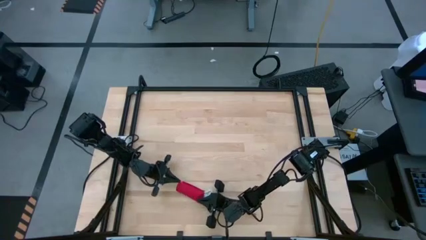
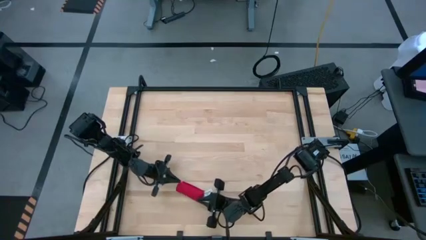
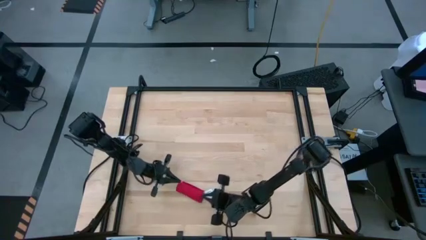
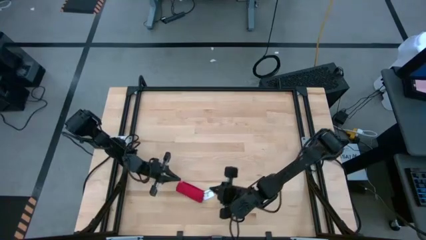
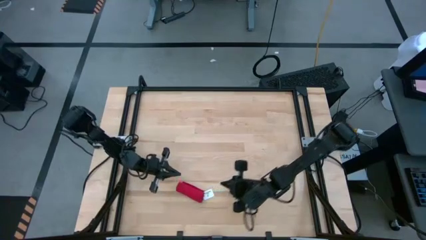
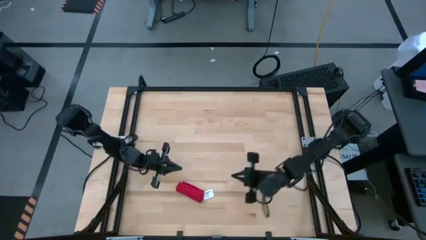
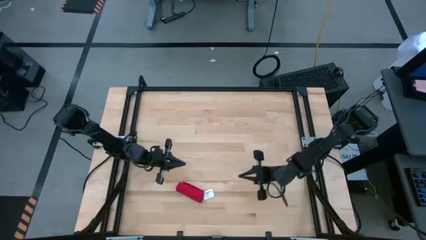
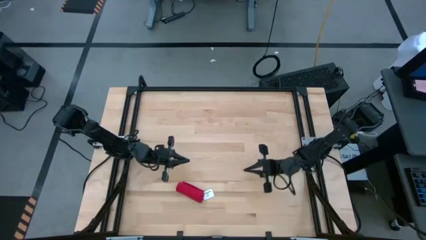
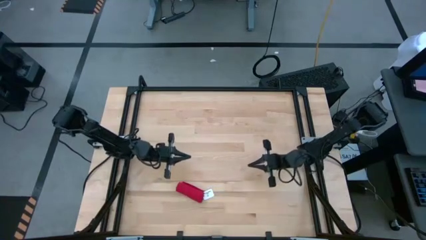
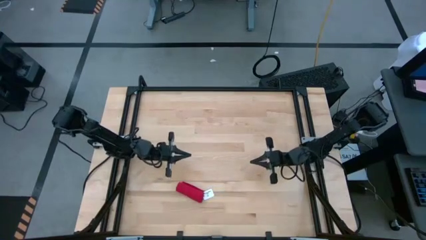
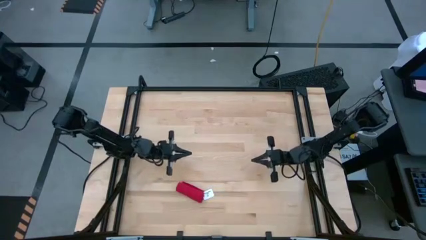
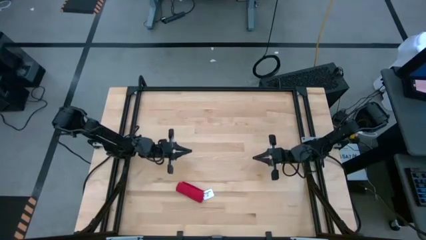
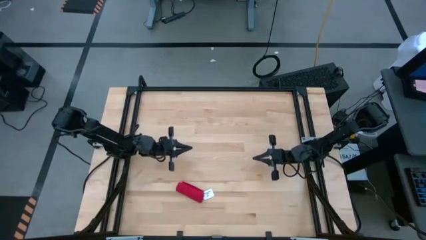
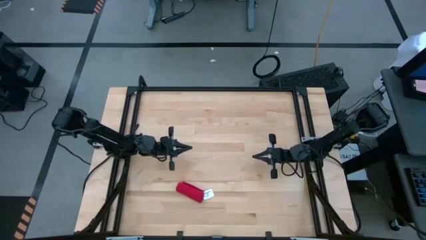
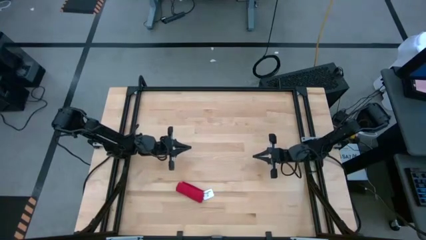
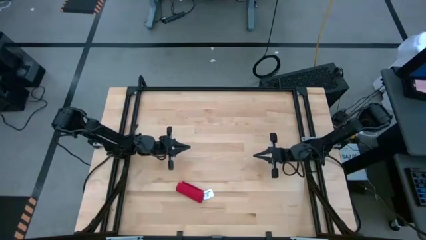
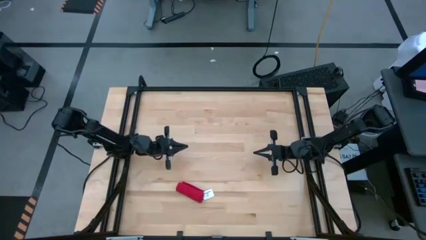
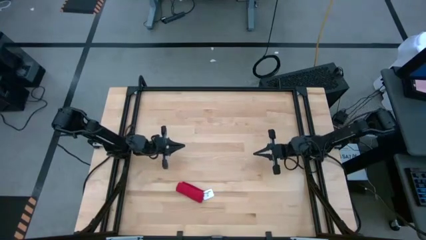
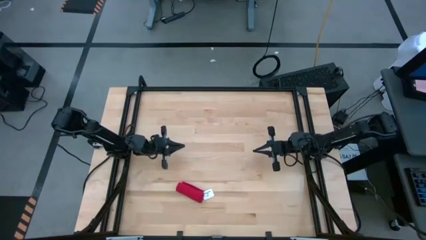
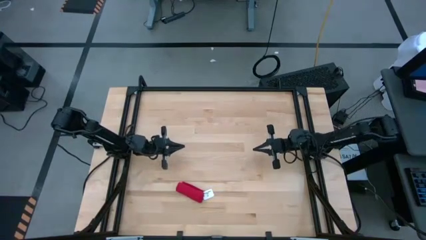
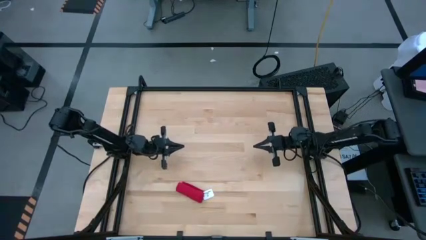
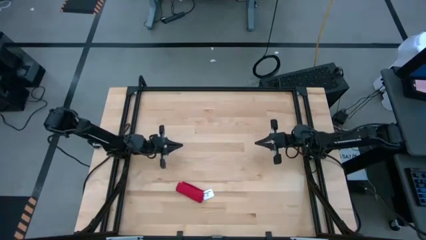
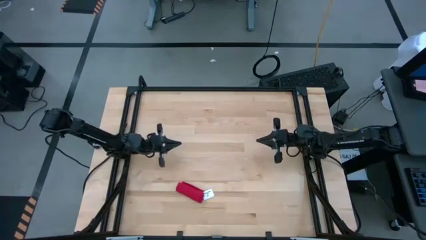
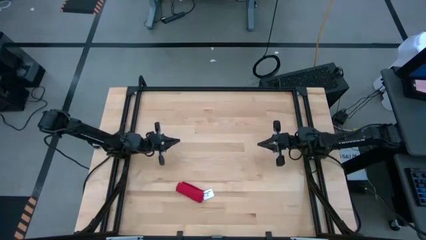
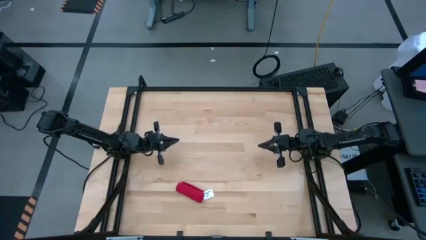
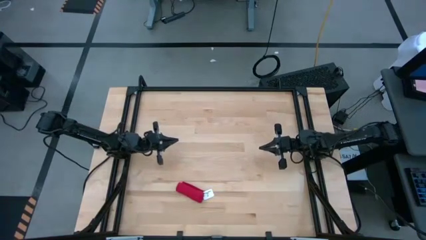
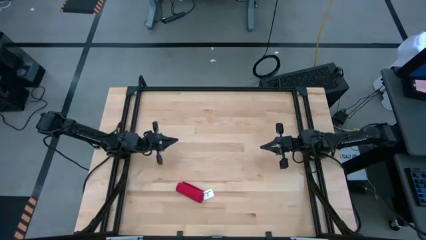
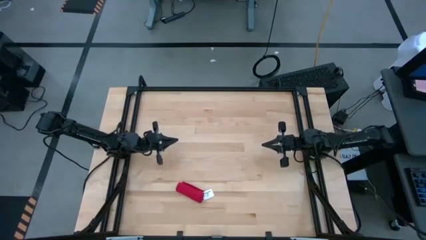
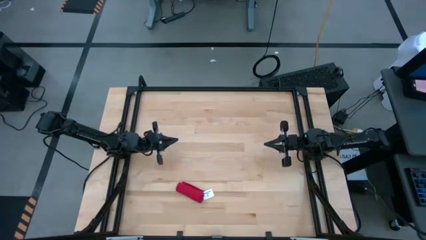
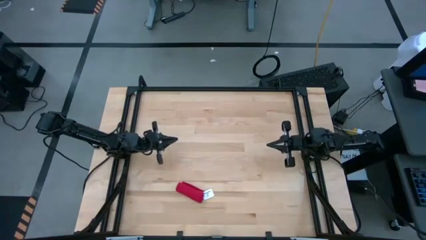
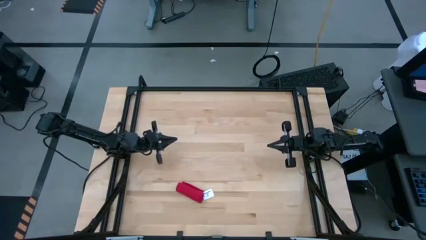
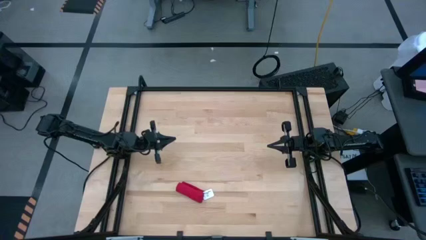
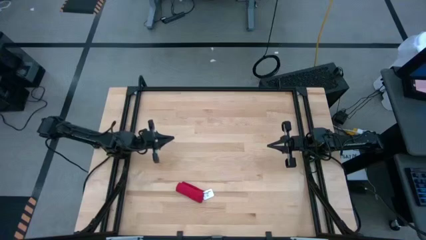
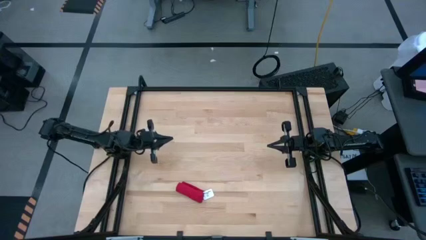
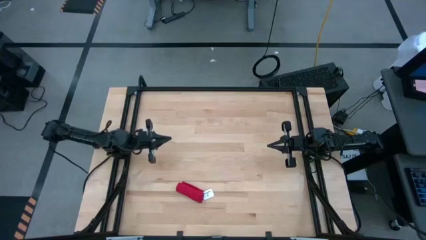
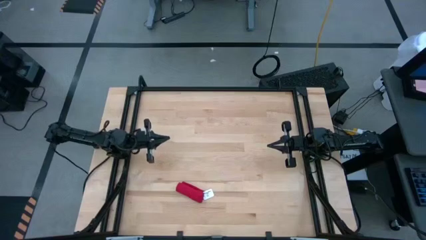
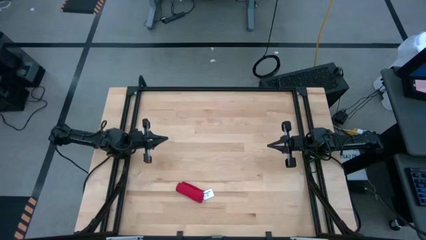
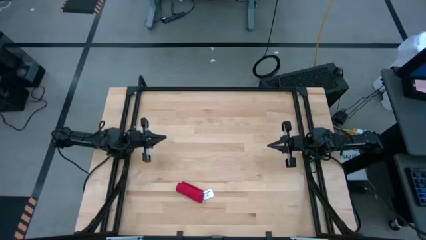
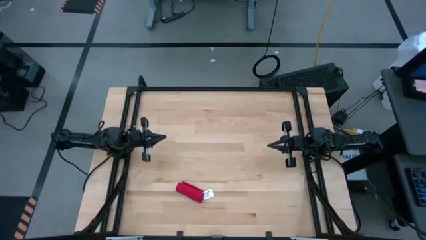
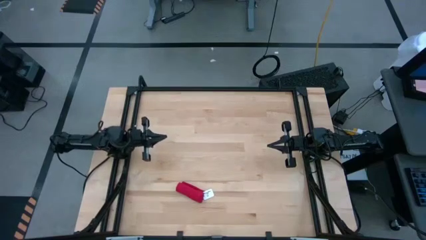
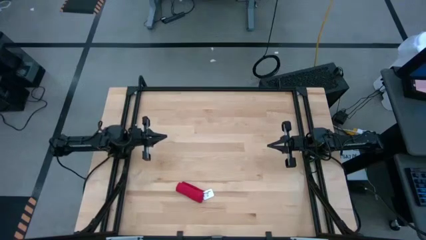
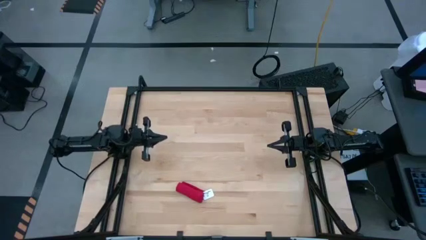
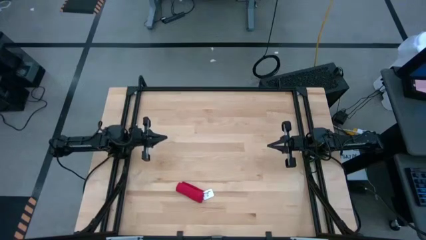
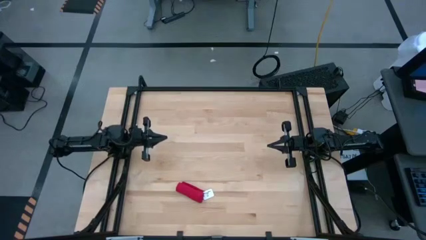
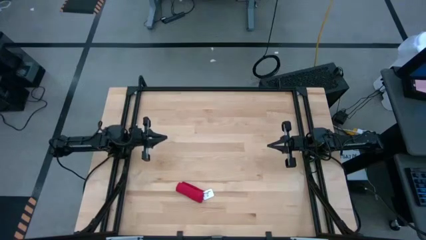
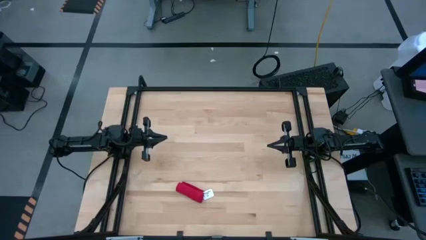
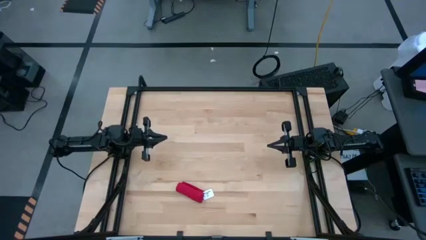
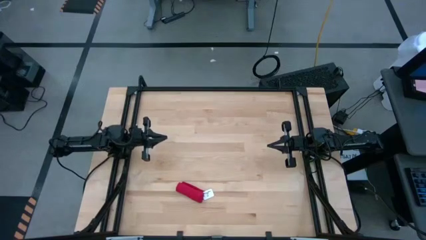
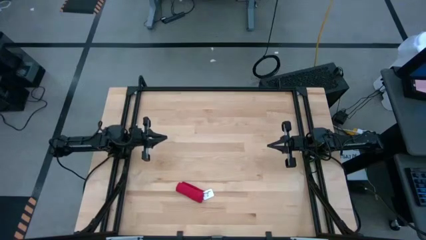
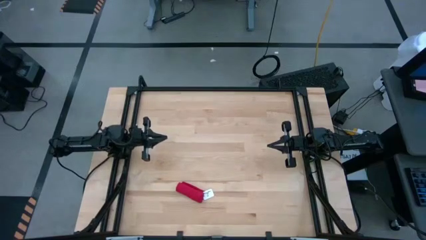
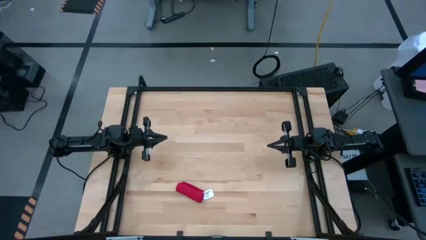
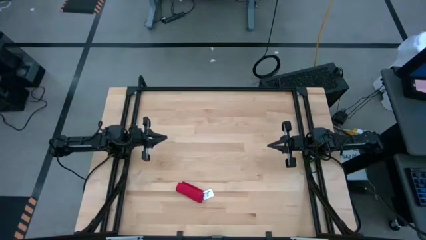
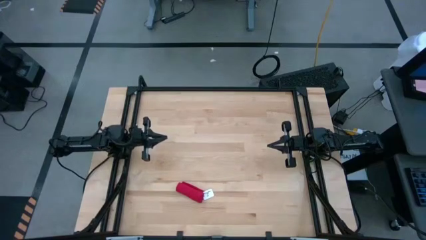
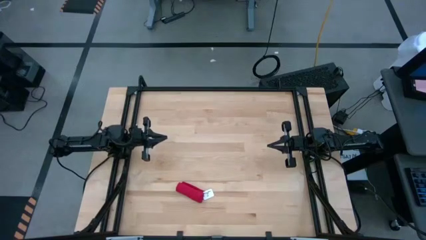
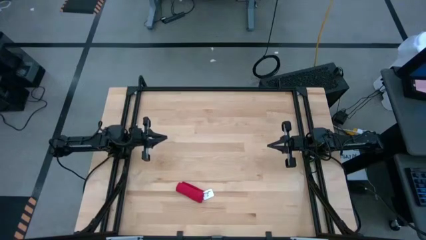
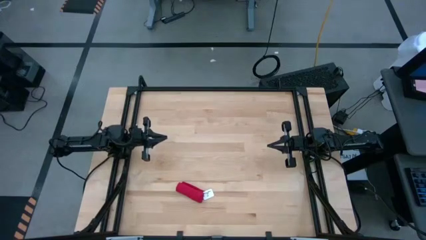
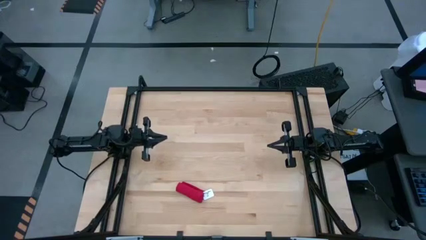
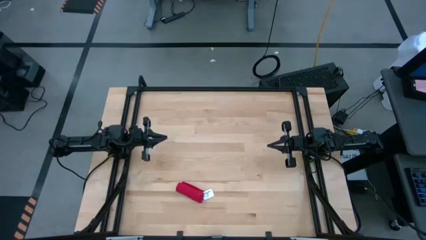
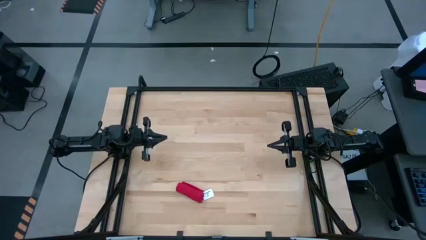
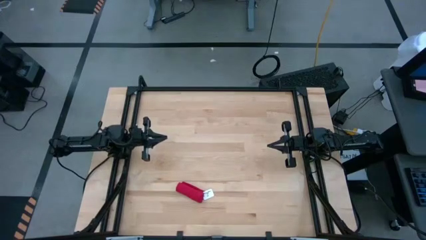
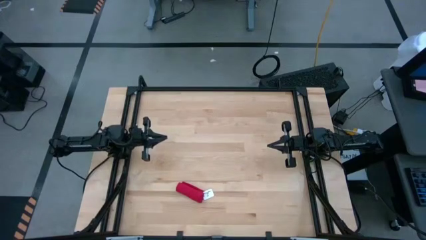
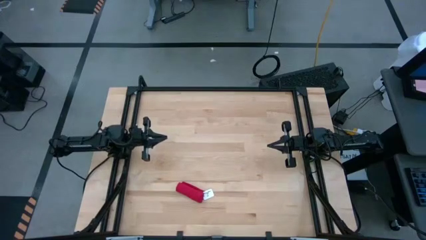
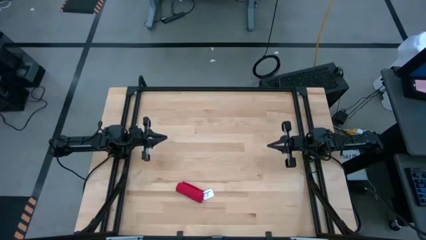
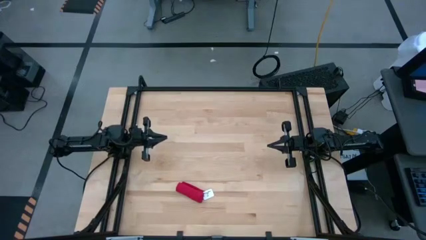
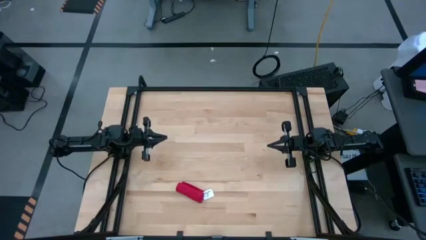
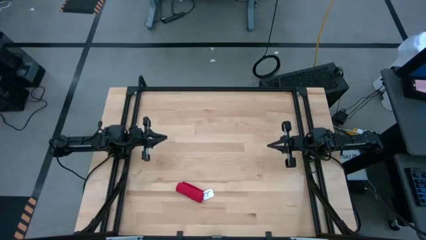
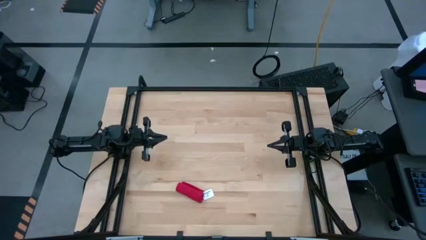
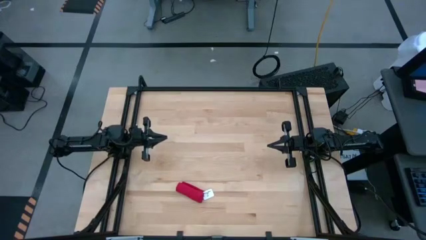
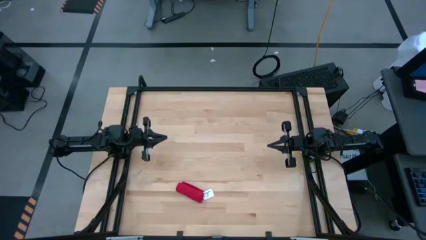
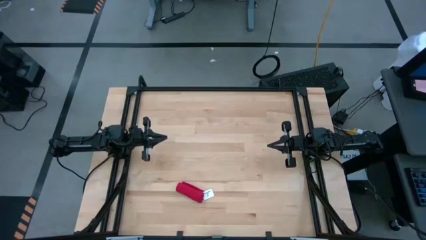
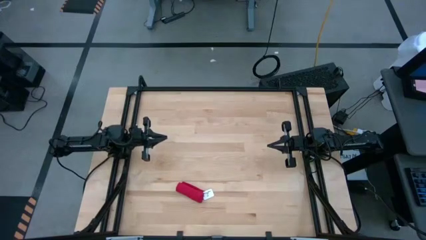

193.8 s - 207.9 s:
Task: Roll towel
Return to Home Position
